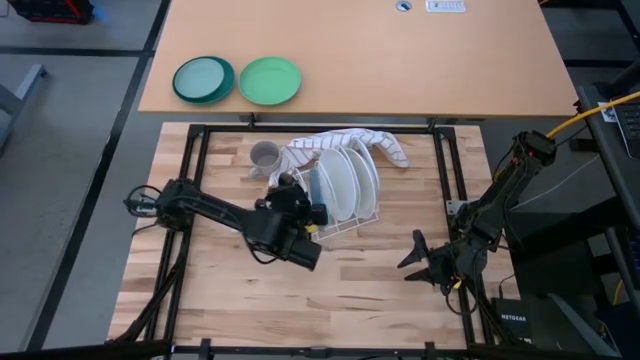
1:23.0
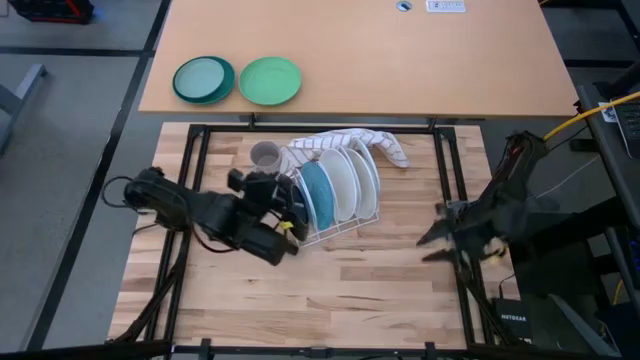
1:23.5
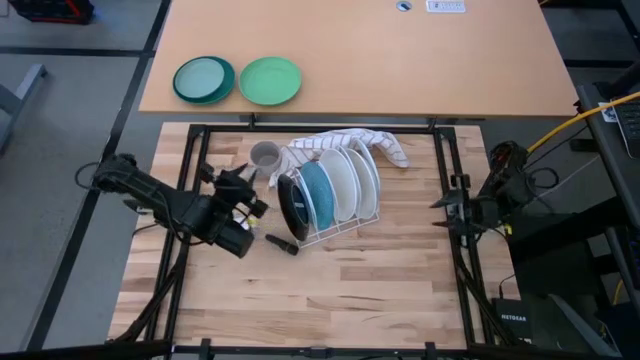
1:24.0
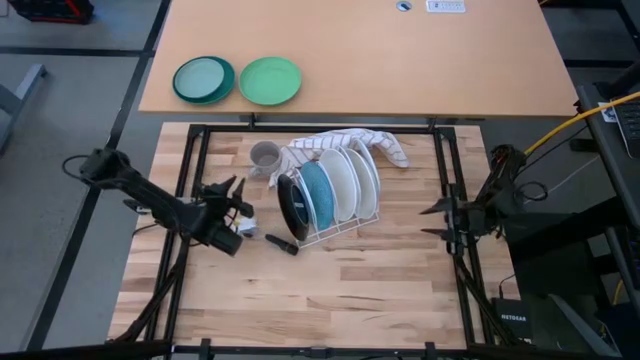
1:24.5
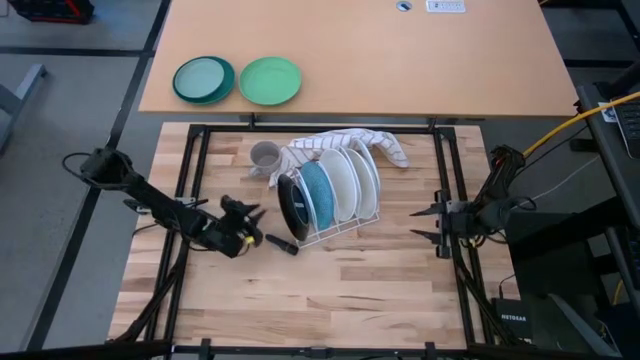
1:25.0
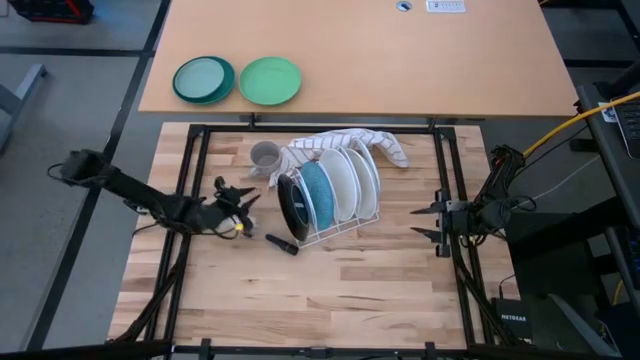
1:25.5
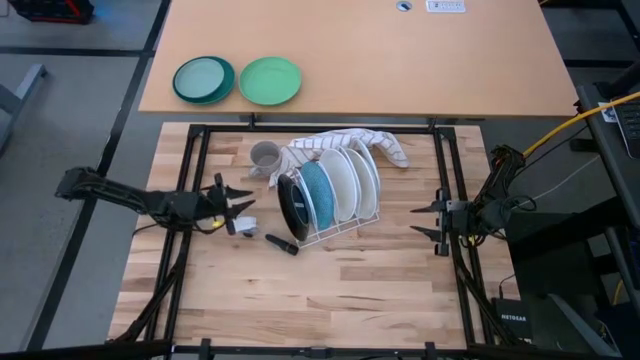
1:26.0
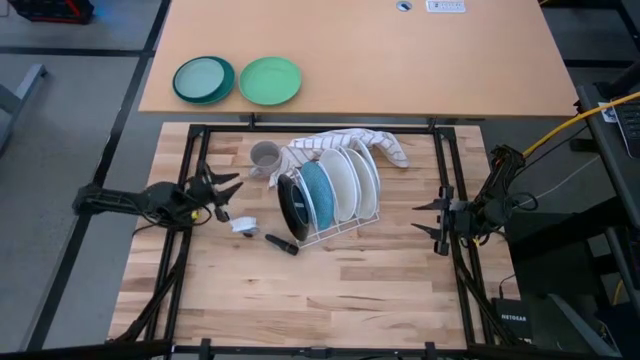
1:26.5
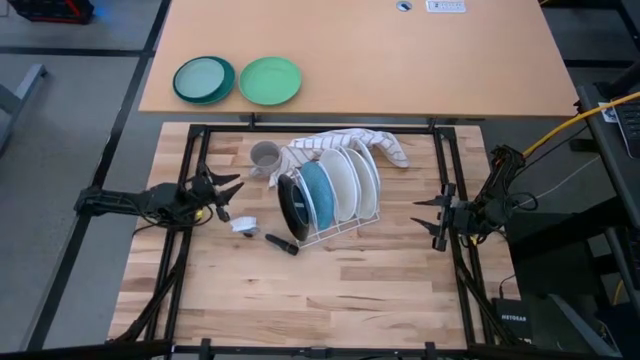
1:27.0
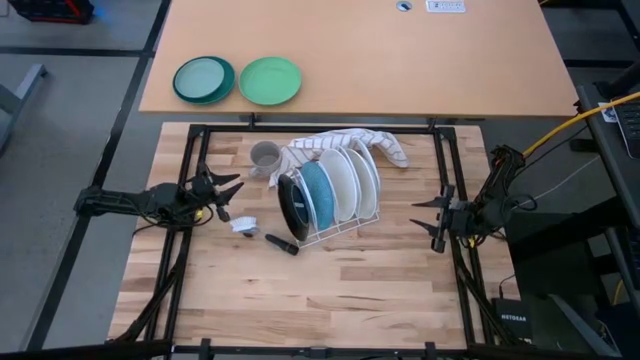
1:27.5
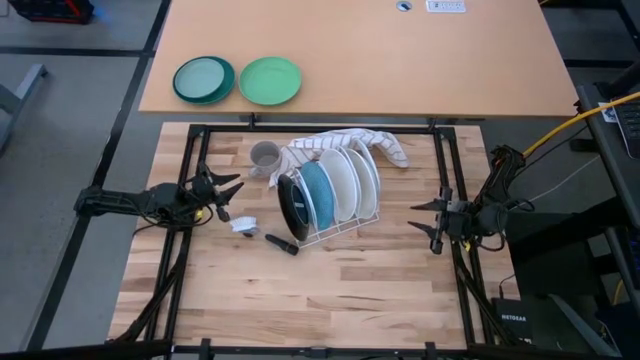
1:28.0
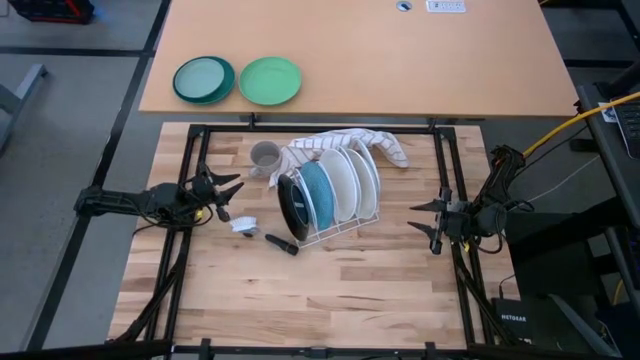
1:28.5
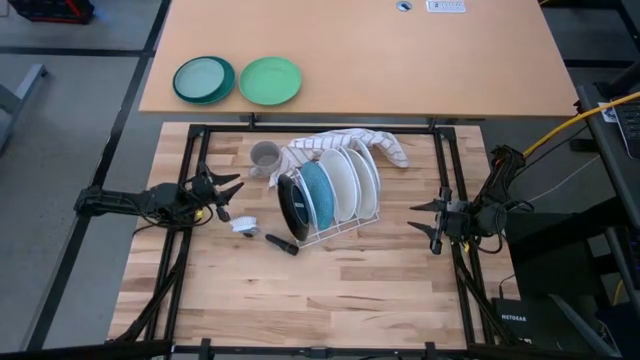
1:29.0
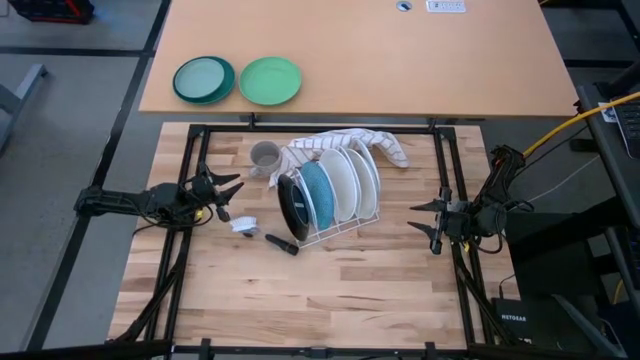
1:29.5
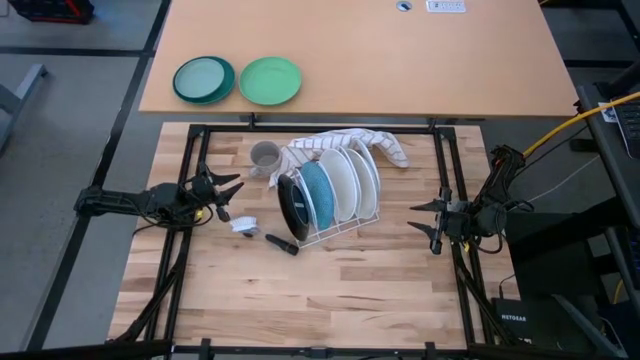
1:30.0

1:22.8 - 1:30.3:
Task: Sort dishes
Return to Home Position

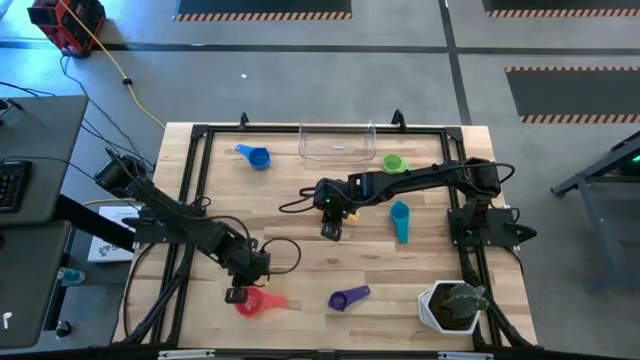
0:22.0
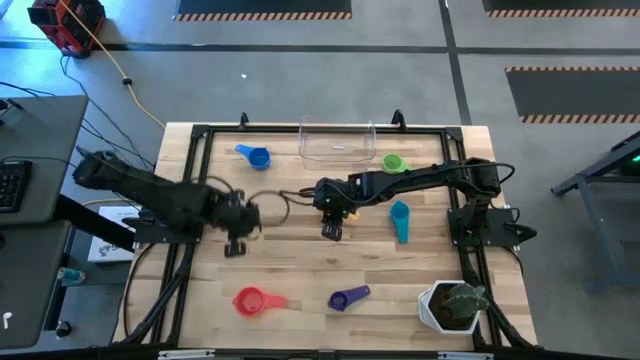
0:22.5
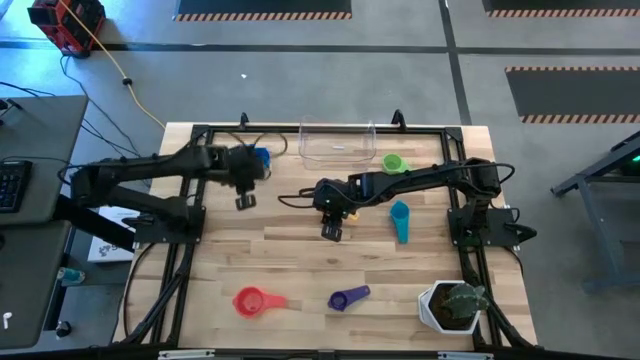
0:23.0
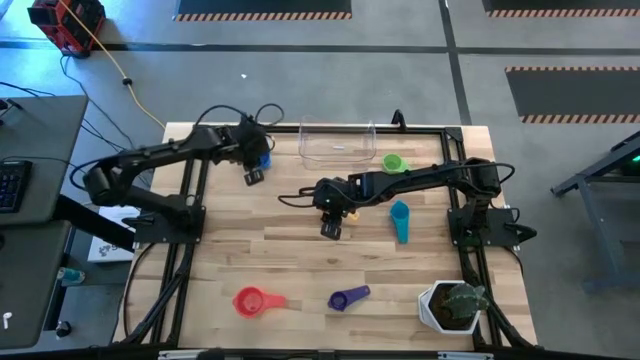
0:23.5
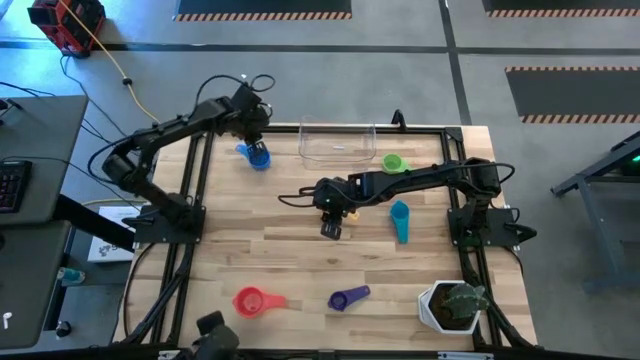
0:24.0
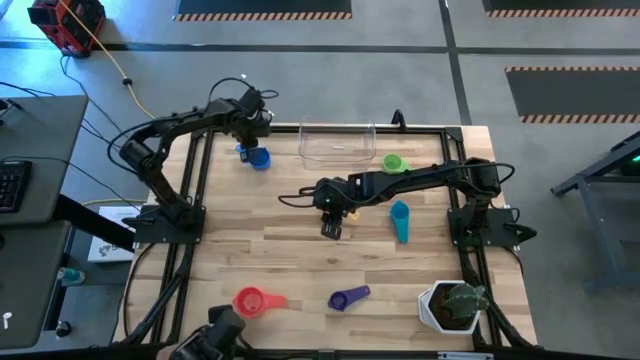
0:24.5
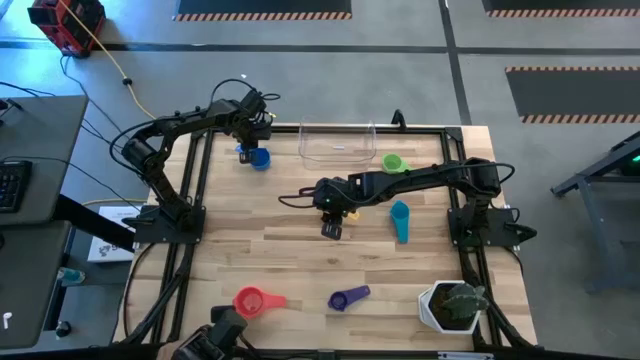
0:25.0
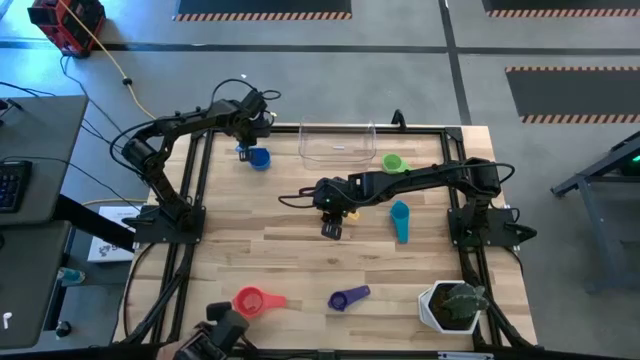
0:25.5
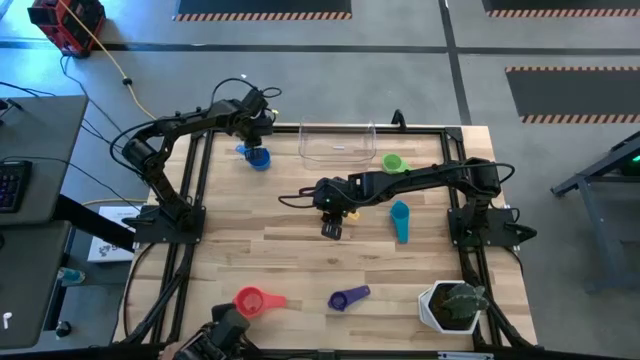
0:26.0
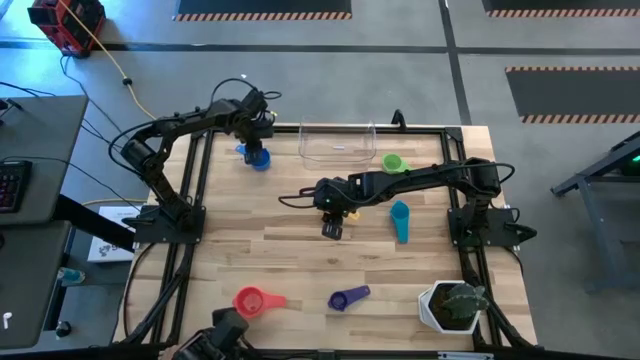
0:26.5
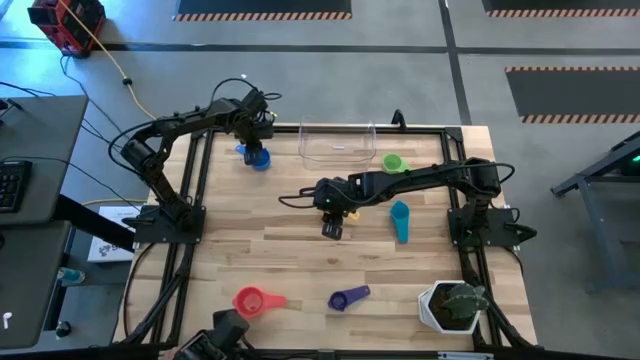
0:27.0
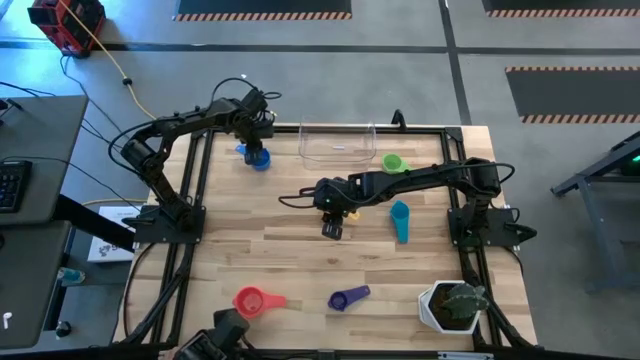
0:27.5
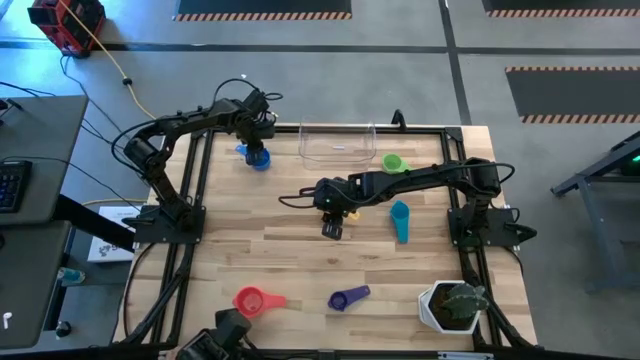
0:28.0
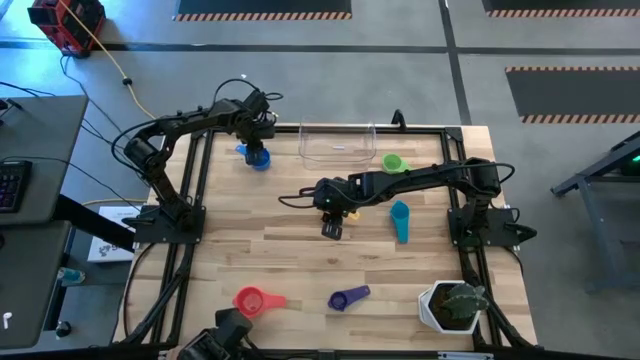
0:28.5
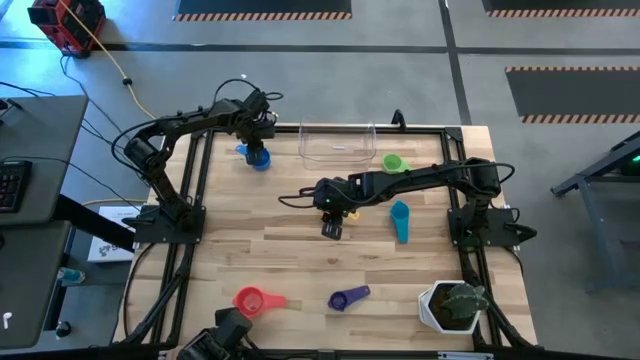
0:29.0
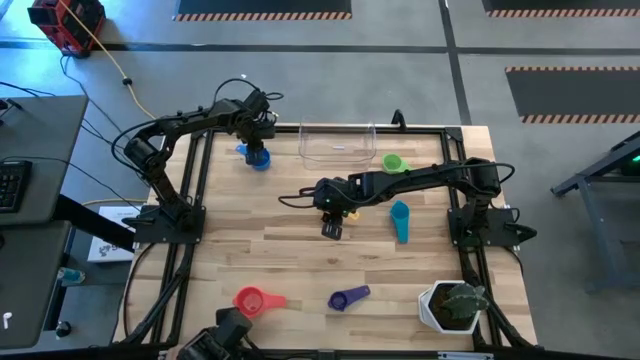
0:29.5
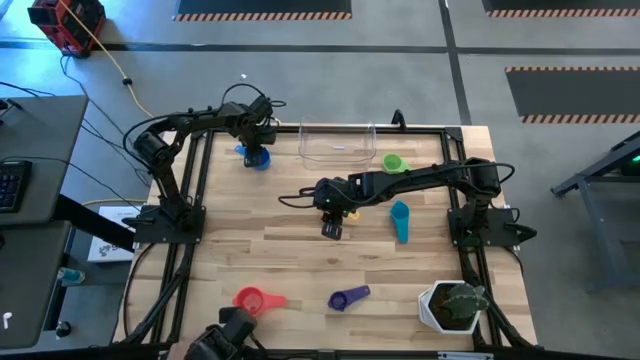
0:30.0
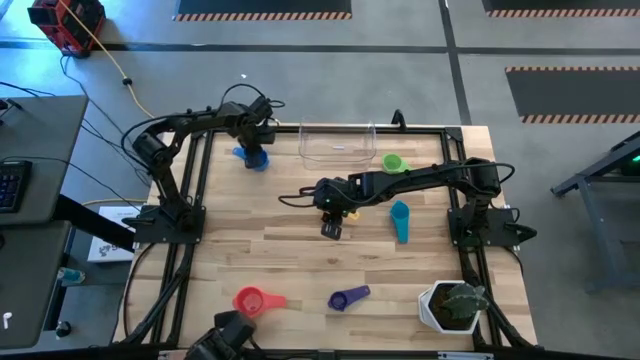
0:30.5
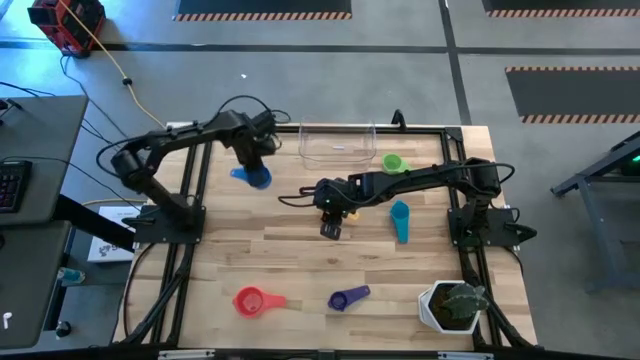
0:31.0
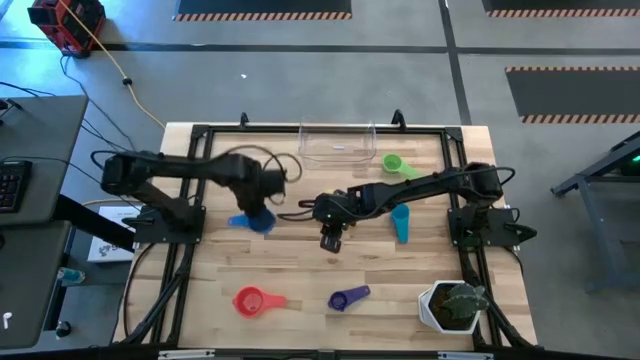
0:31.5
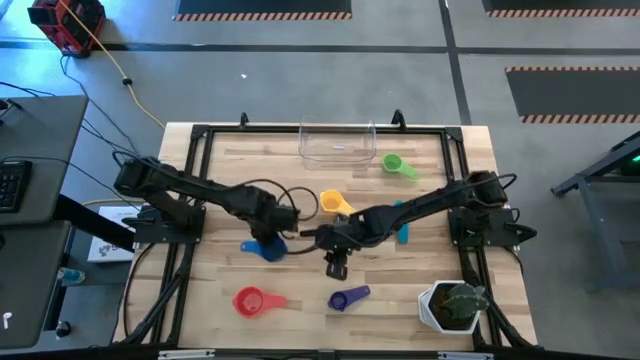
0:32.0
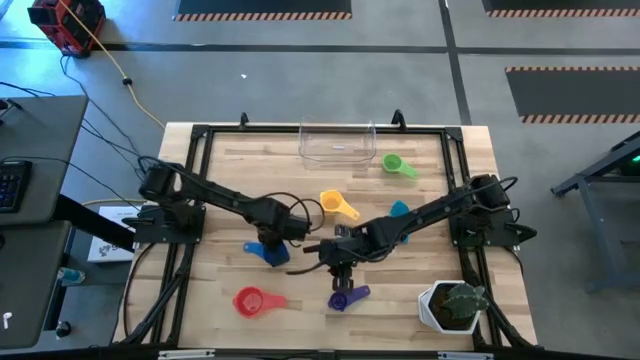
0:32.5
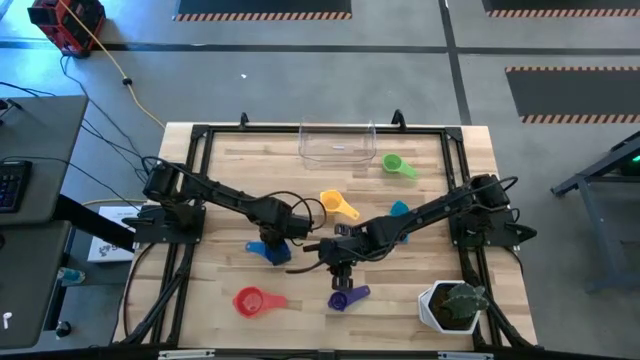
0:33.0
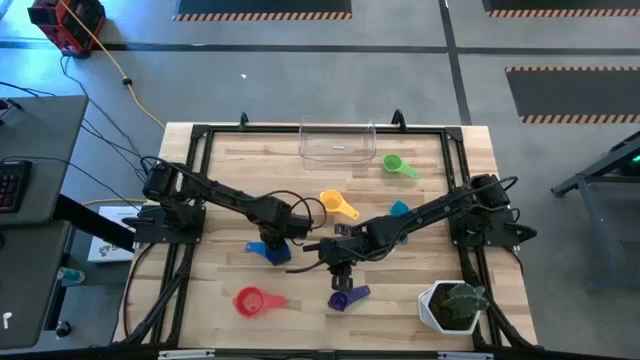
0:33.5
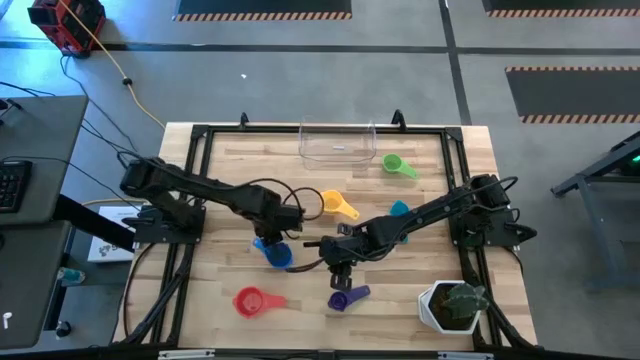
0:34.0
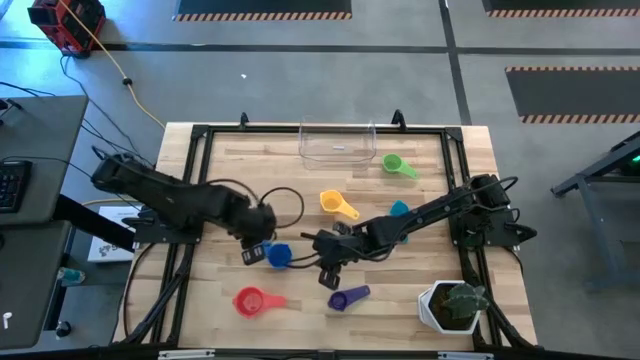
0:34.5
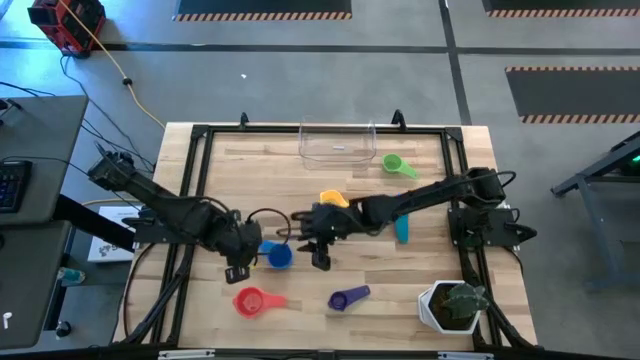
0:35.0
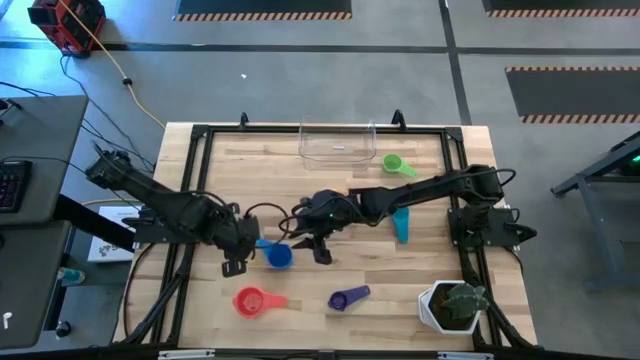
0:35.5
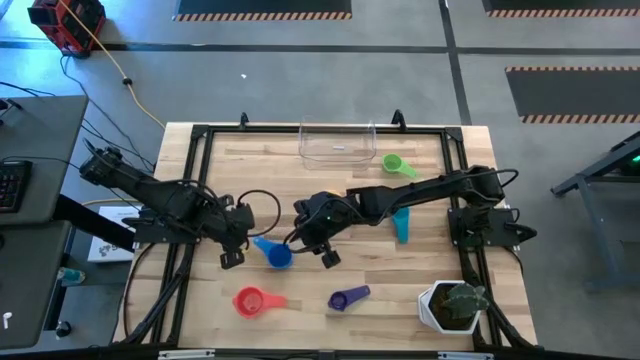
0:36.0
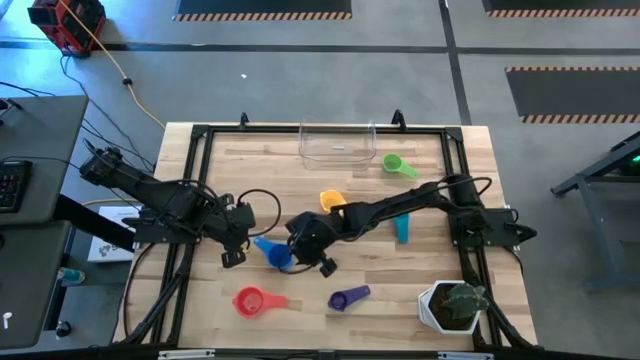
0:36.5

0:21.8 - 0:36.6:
Task: Nest measuring cups in basket
Stack the blue measuring cup into the red measuring cup
